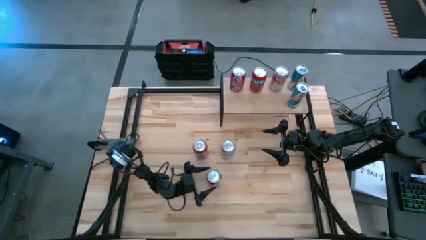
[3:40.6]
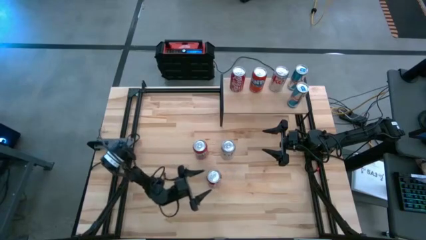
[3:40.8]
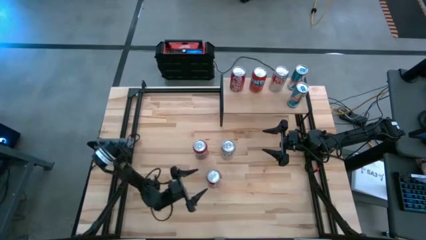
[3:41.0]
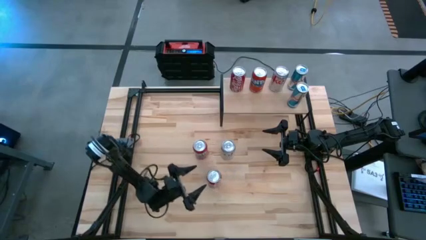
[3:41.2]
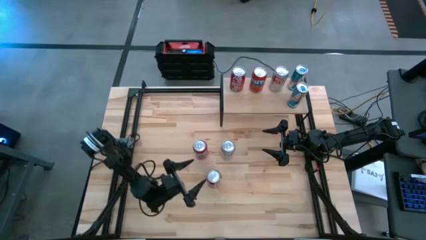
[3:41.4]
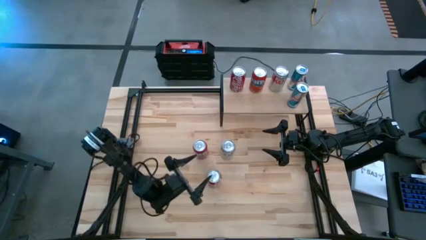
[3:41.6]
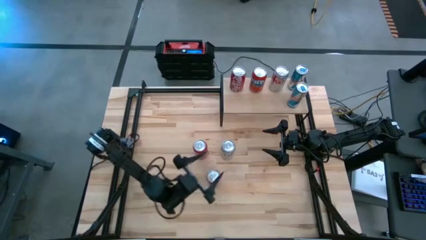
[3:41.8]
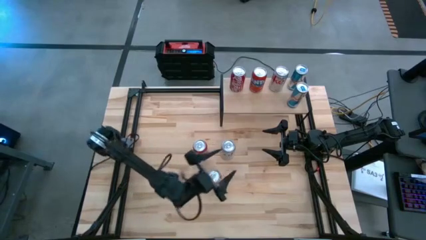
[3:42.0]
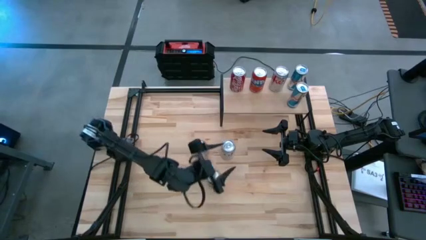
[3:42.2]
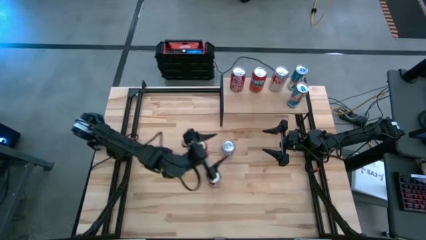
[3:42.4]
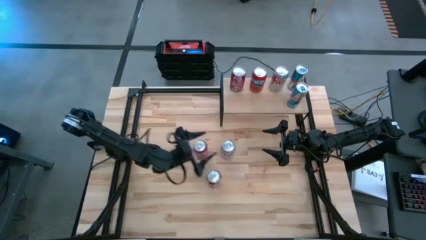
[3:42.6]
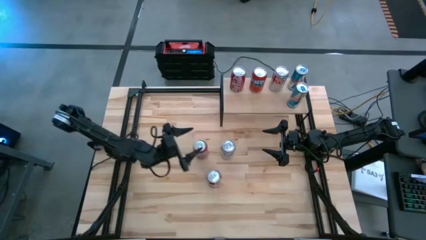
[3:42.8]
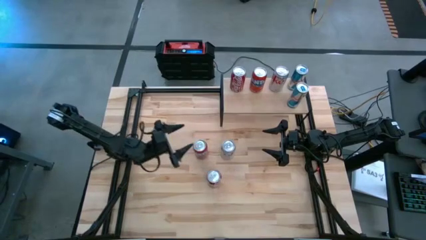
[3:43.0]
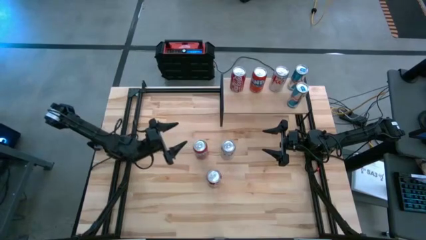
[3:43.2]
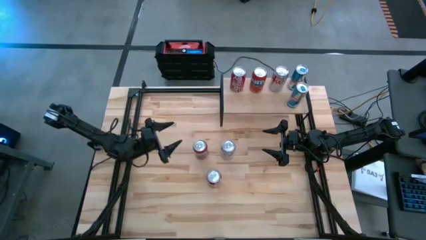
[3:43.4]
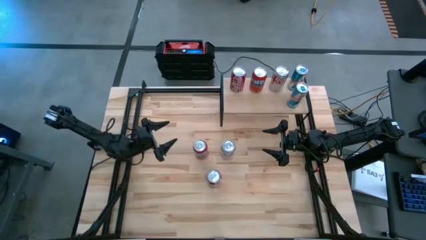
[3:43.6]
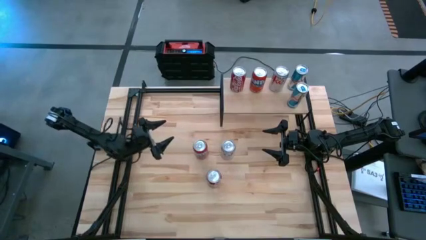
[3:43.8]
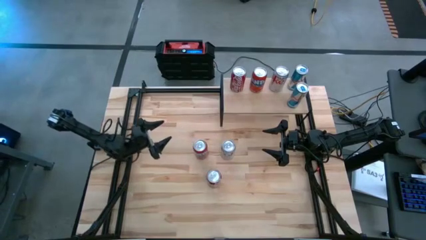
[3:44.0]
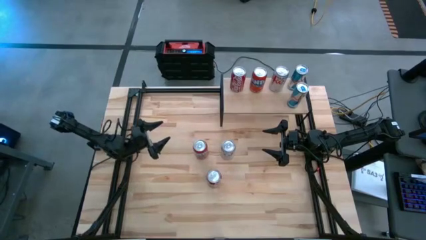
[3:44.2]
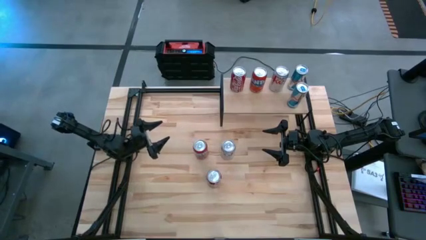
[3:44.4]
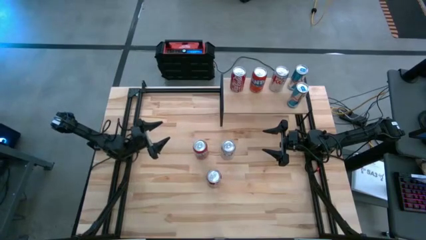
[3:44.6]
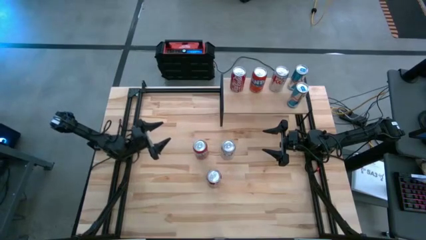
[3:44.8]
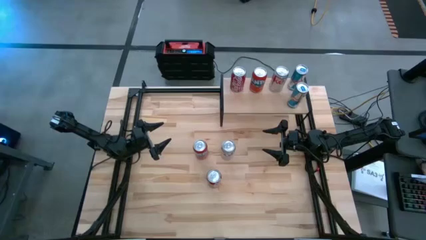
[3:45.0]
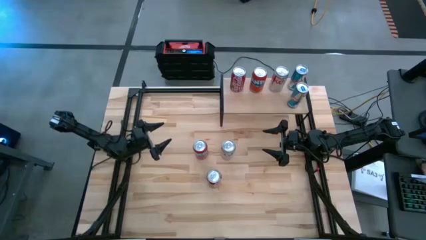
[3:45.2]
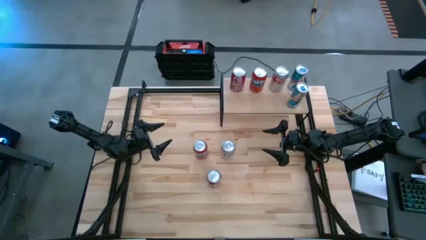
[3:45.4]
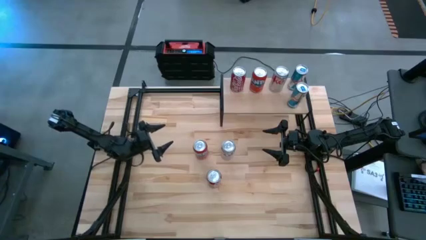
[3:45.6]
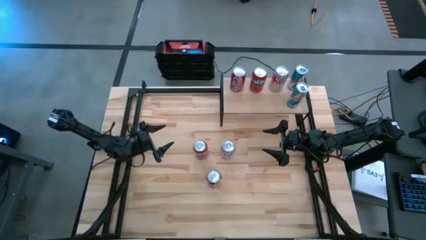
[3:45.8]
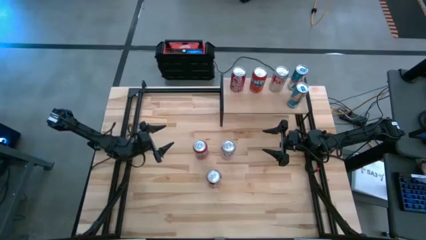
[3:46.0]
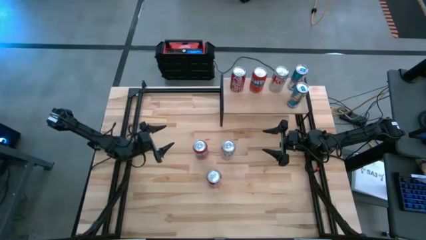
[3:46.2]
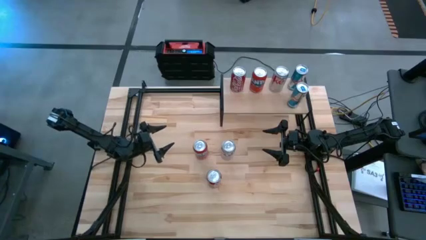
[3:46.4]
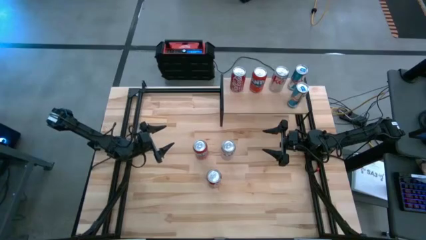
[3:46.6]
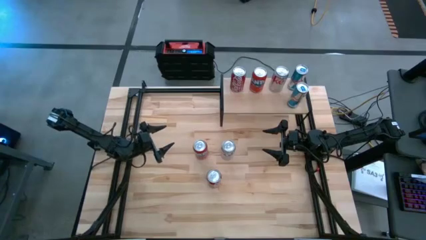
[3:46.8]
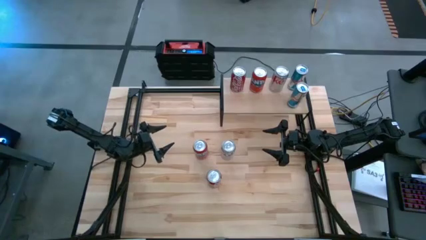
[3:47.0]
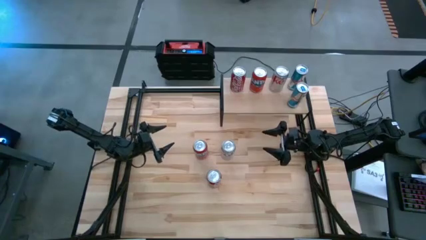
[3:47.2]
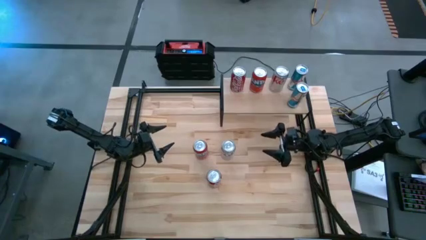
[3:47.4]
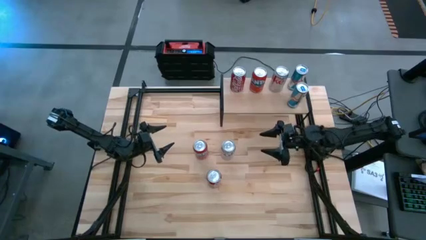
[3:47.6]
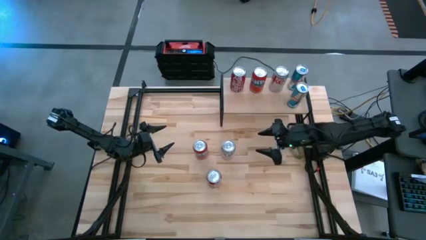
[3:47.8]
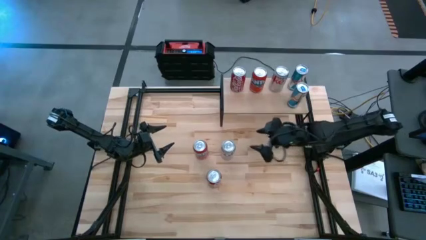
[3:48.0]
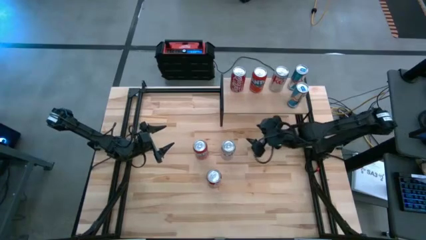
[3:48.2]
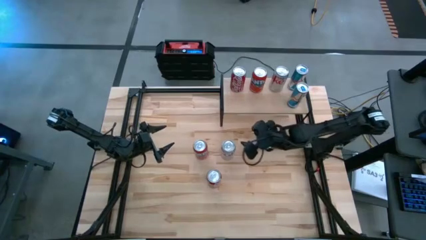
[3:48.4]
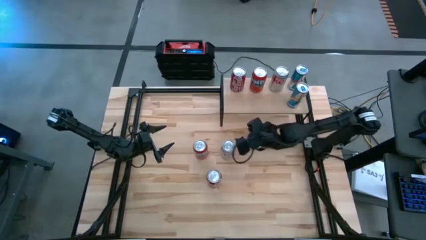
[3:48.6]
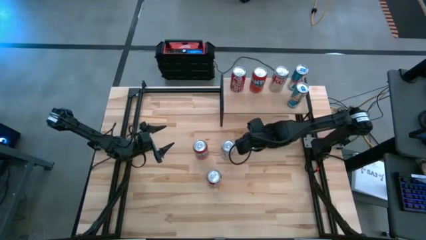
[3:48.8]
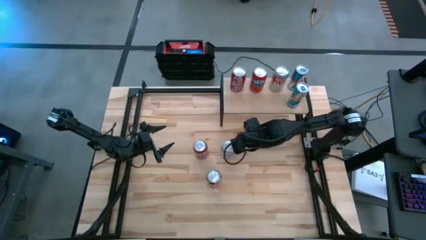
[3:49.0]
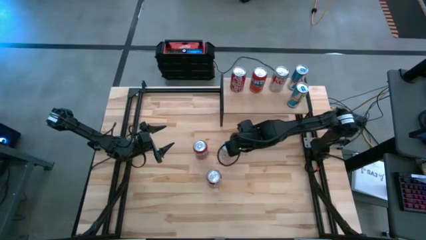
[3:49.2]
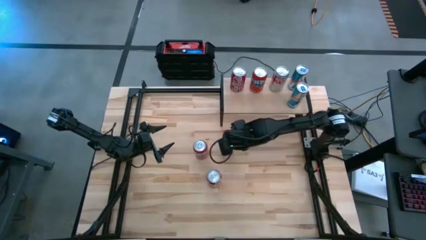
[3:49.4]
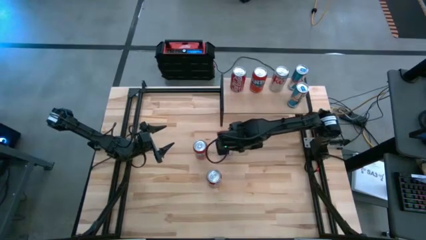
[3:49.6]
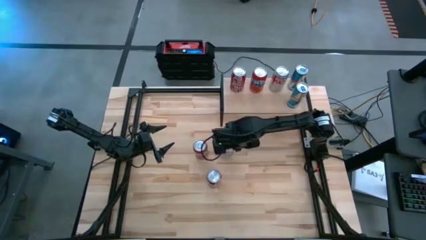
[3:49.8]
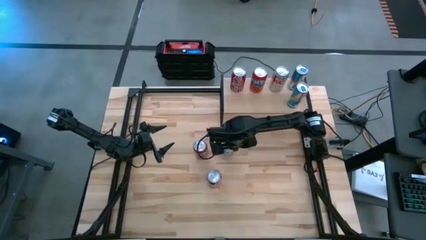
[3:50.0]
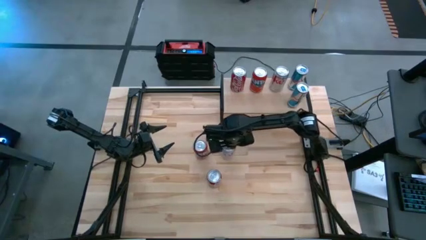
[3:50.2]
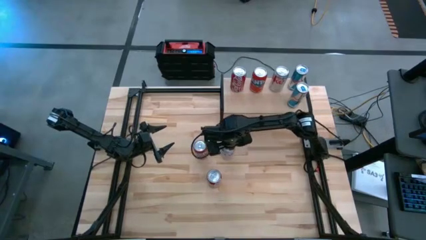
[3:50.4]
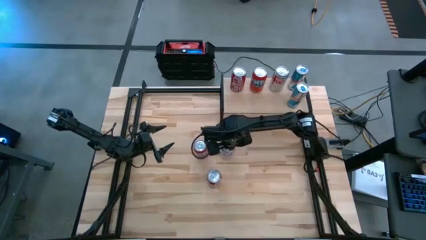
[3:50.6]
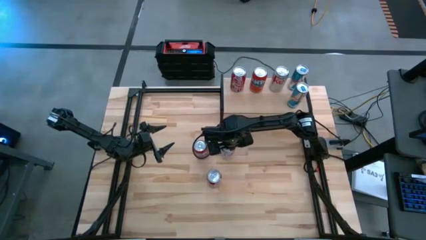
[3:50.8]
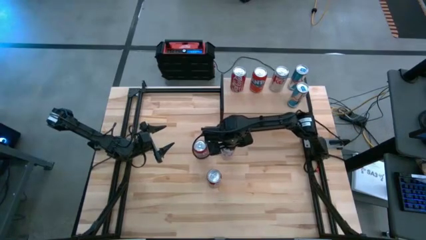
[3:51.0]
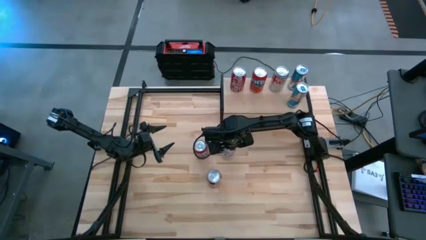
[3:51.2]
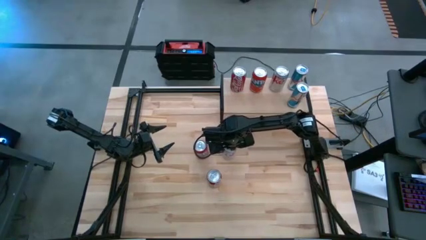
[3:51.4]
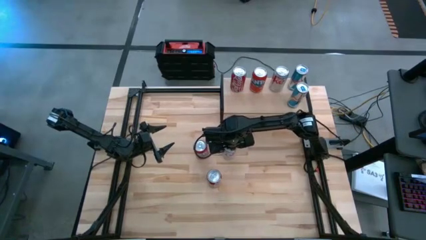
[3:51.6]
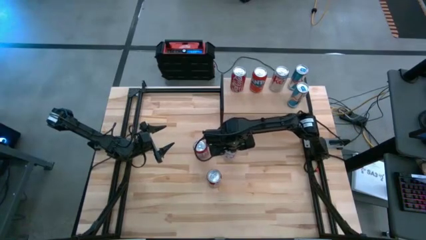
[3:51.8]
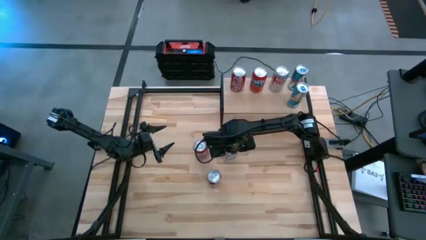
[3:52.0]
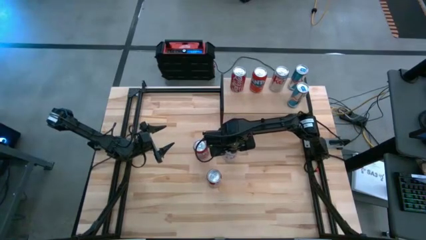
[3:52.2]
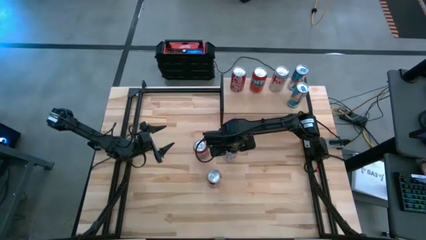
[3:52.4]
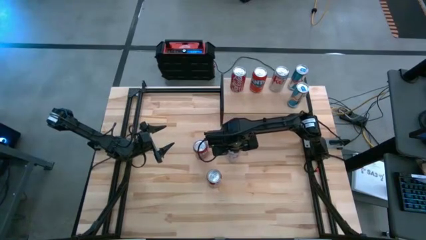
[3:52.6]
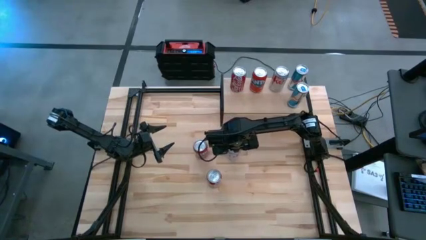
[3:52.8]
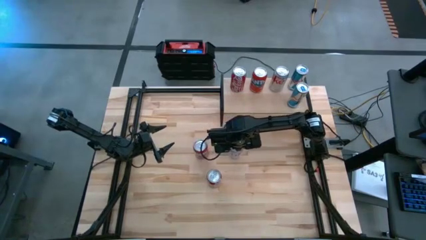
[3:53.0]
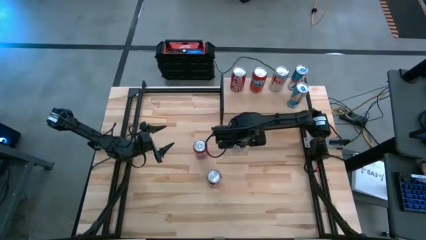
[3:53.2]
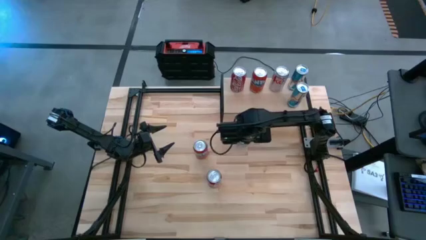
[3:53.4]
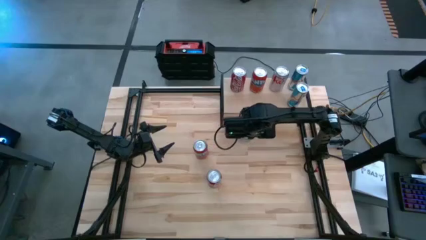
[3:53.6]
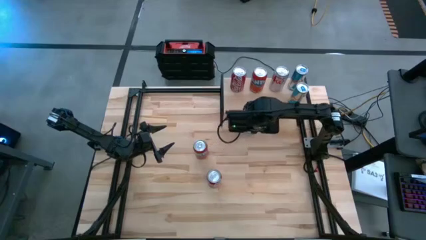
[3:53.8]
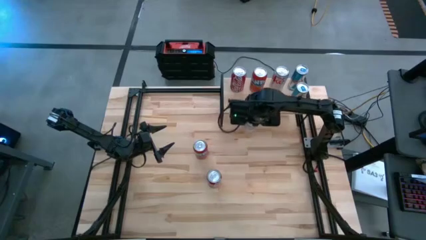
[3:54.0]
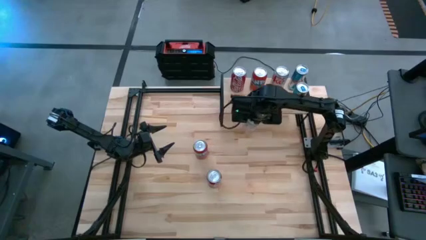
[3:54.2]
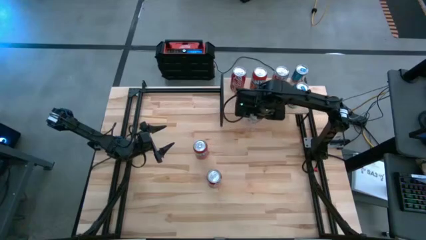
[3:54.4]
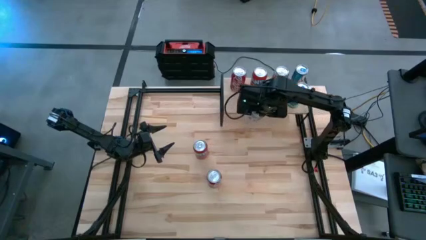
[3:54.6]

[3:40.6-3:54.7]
Task: Place canned beverage on shelf
Put the silver soda can on the shelf aligned with the other silver soda can

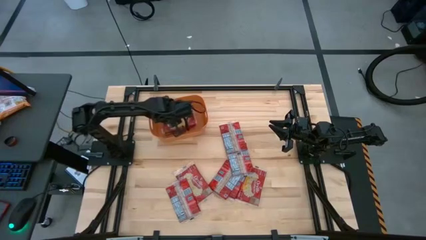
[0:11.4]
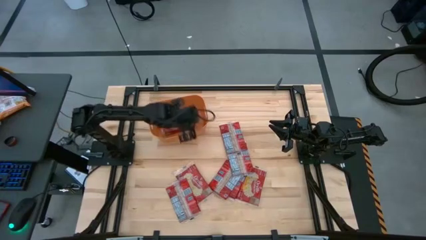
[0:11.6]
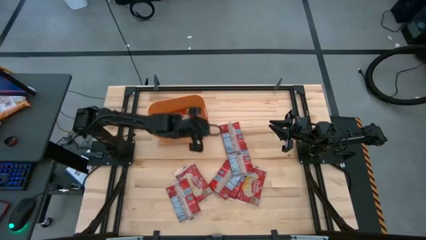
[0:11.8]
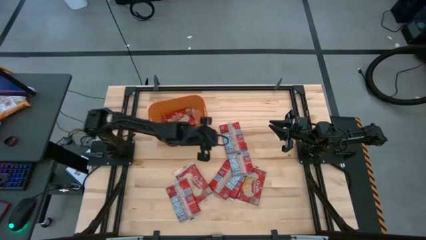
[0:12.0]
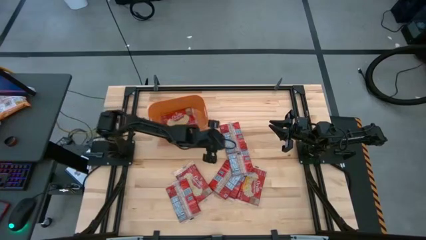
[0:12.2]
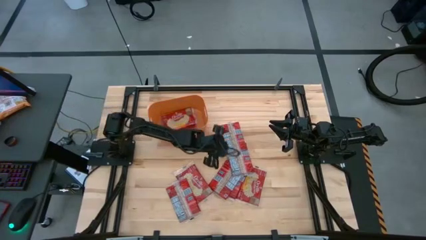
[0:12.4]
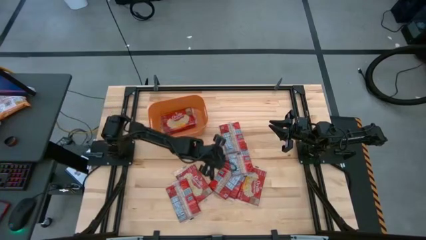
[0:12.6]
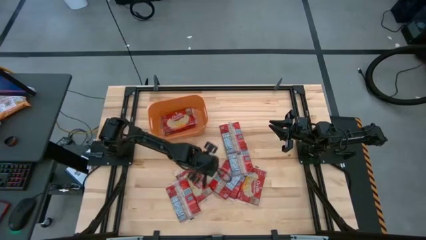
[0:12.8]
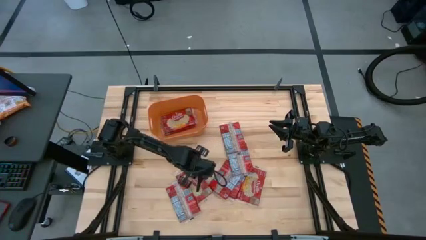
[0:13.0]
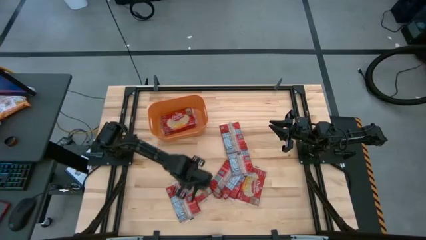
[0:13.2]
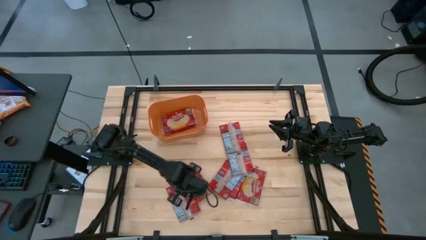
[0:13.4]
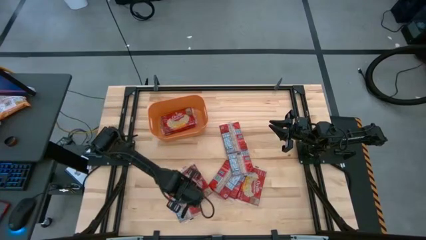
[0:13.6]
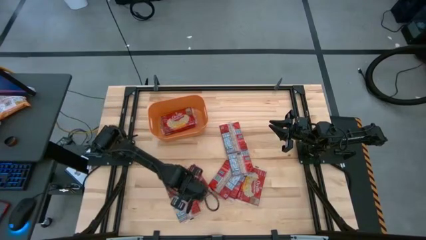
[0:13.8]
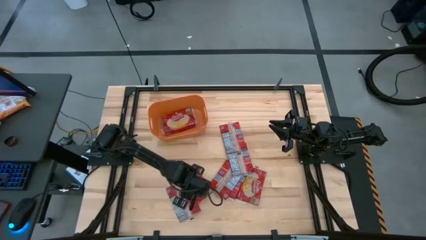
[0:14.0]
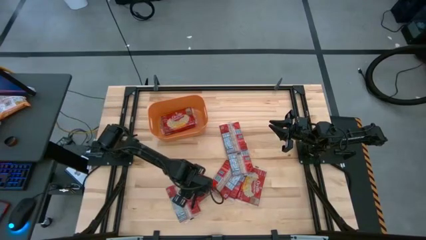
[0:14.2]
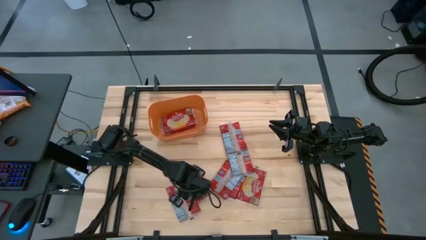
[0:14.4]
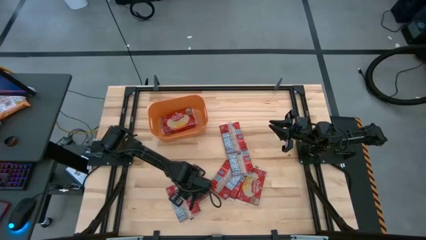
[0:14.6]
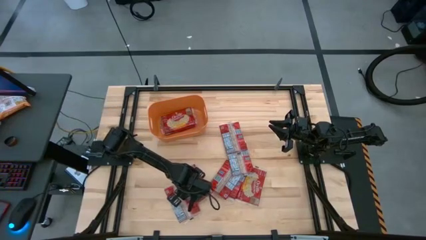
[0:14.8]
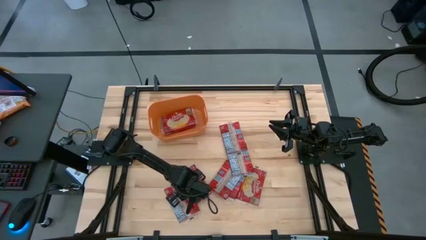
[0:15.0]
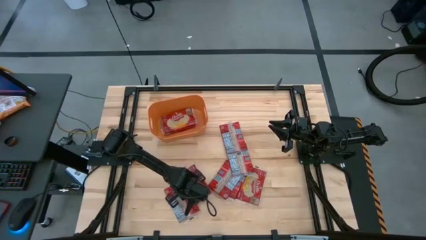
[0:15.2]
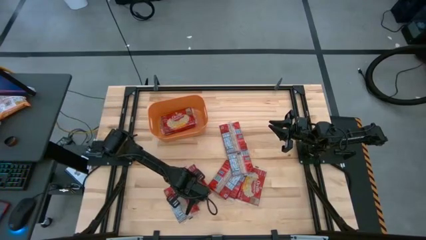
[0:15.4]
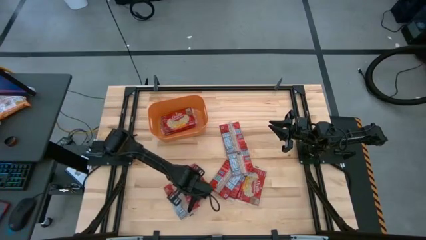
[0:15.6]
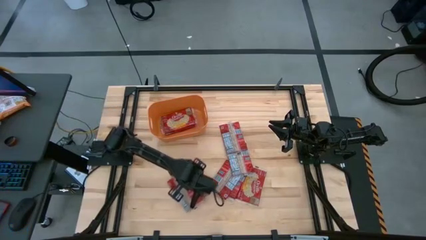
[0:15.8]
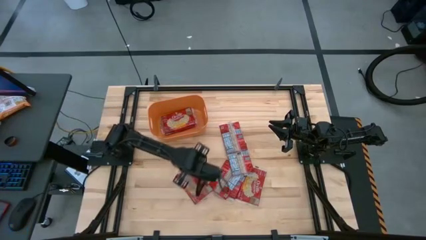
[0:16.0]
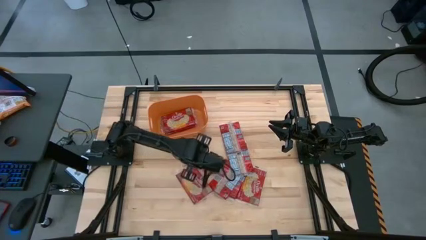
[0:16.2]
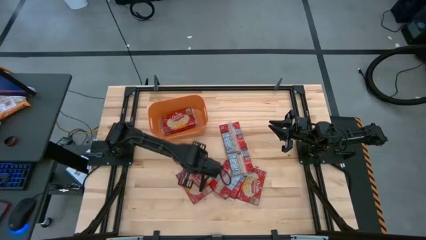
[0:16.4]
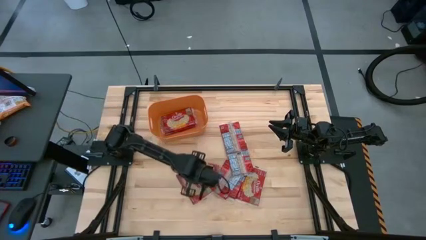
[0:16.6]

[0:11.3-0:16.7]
Task: Sort popcorn bags into baskets
Put the red popcorn bag into the orange container
